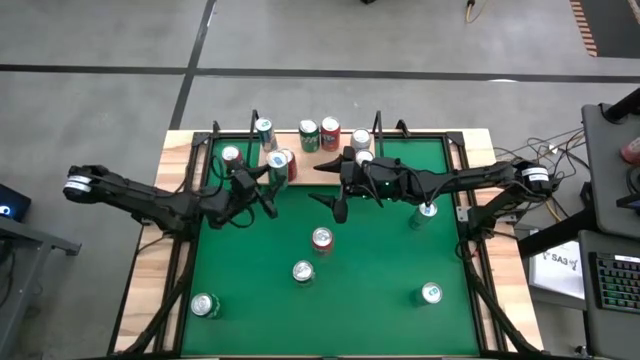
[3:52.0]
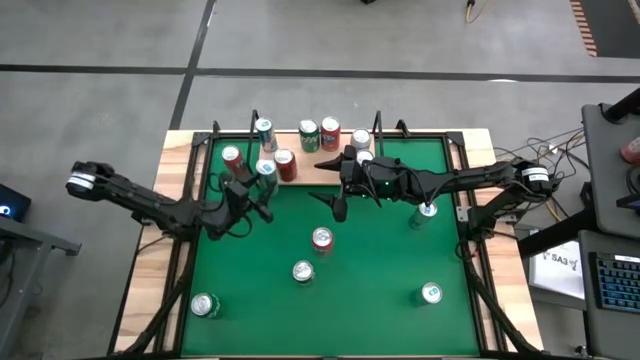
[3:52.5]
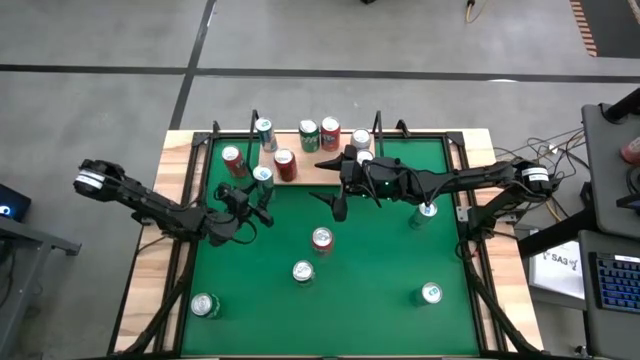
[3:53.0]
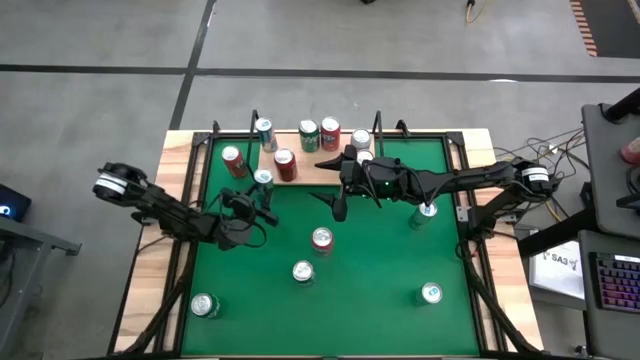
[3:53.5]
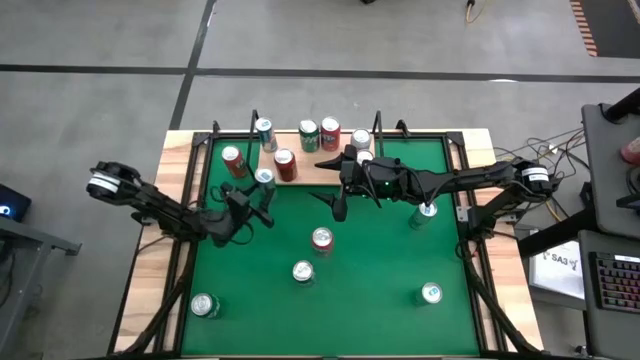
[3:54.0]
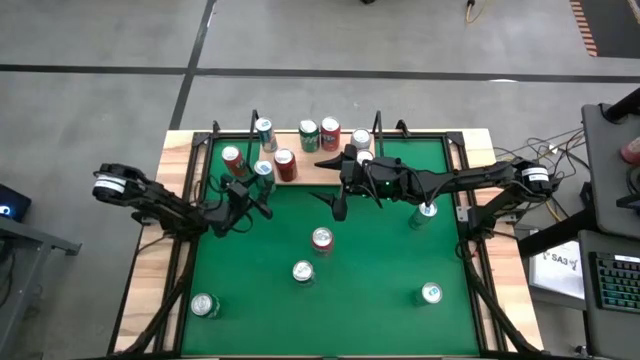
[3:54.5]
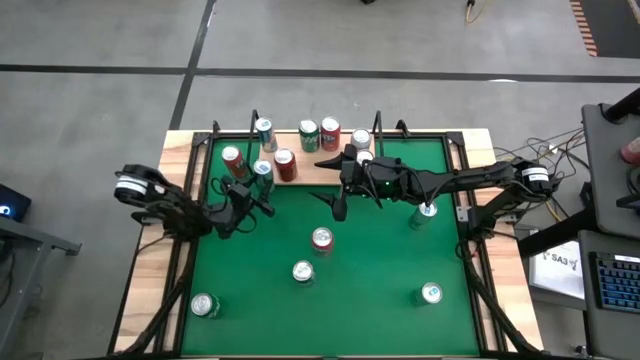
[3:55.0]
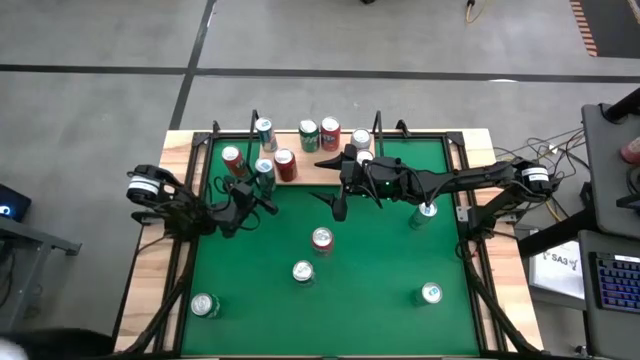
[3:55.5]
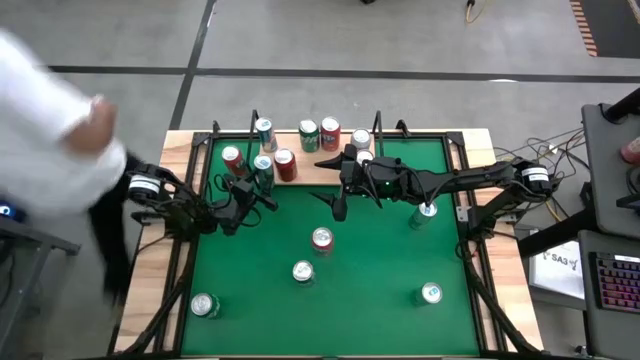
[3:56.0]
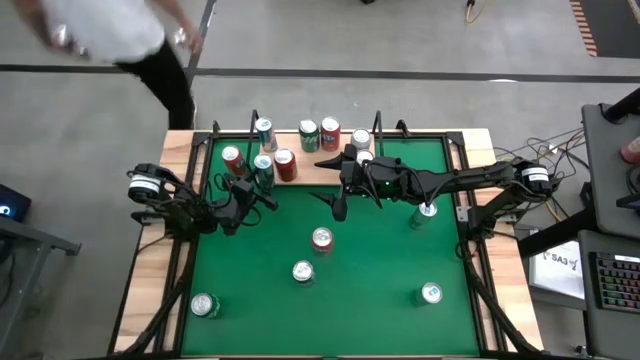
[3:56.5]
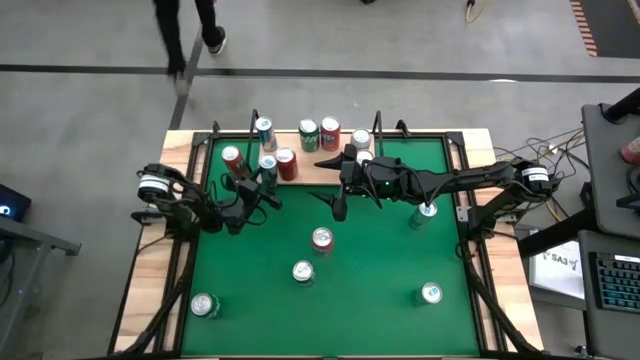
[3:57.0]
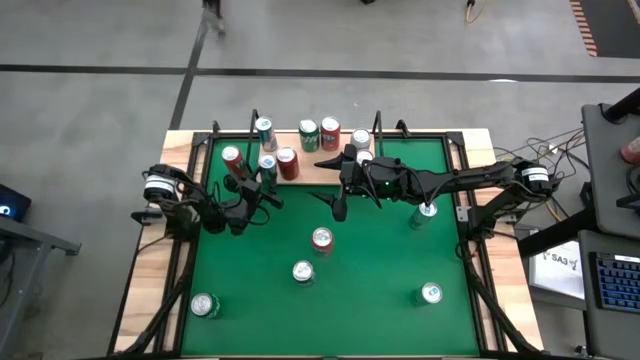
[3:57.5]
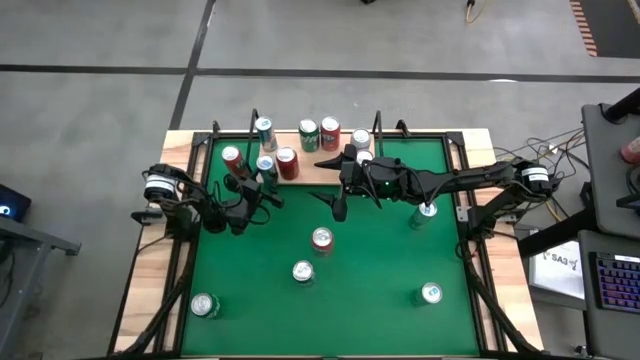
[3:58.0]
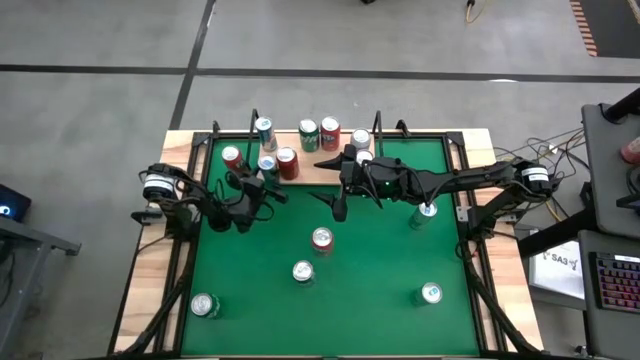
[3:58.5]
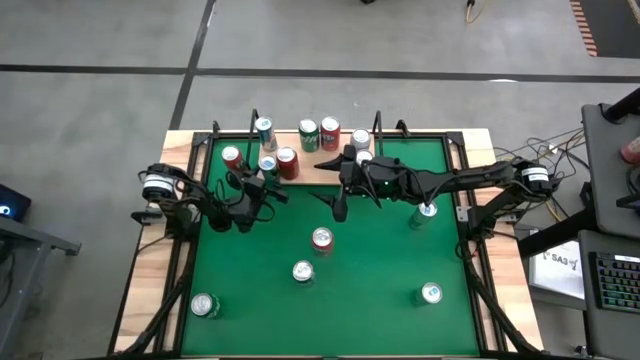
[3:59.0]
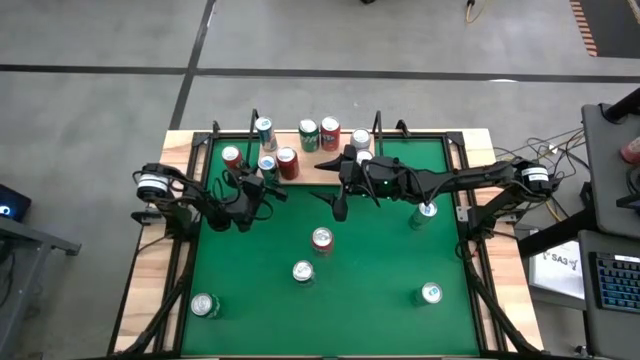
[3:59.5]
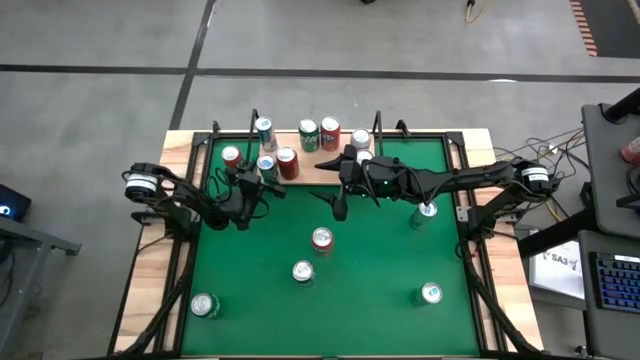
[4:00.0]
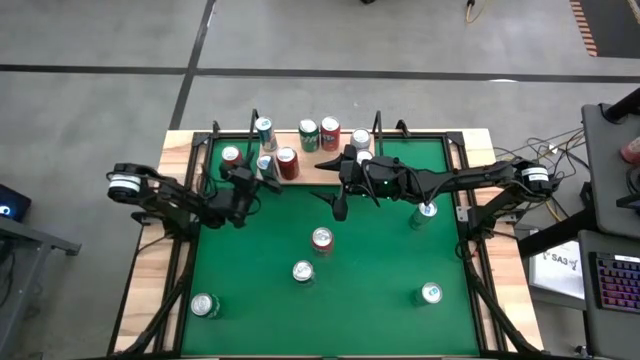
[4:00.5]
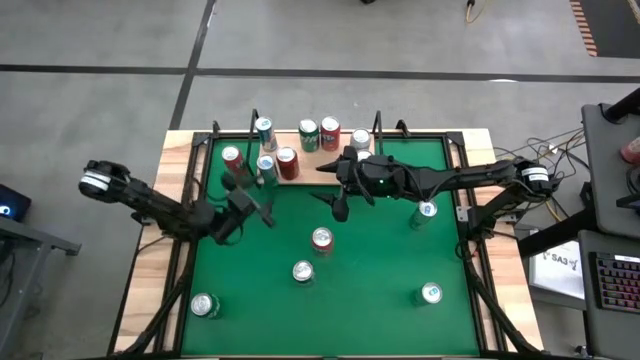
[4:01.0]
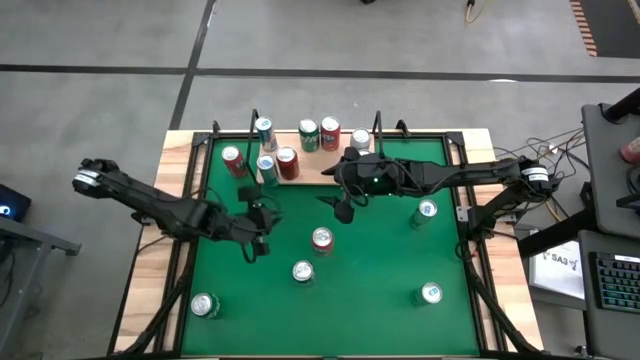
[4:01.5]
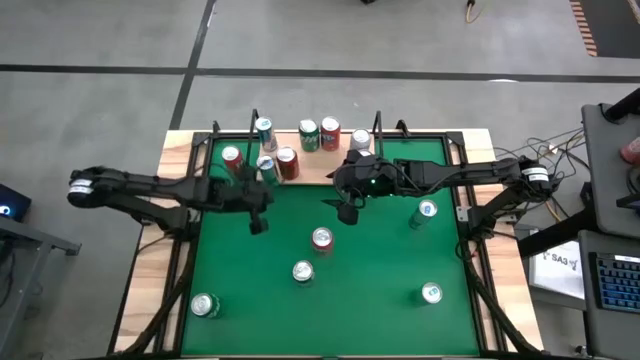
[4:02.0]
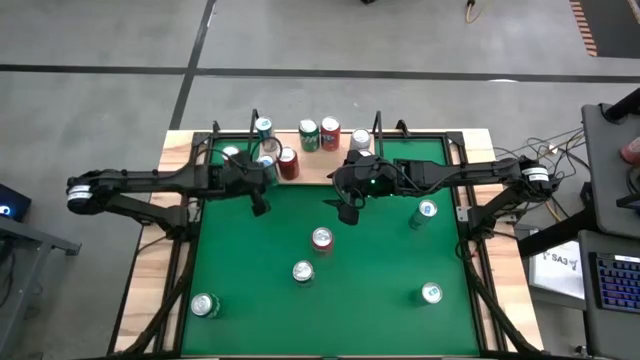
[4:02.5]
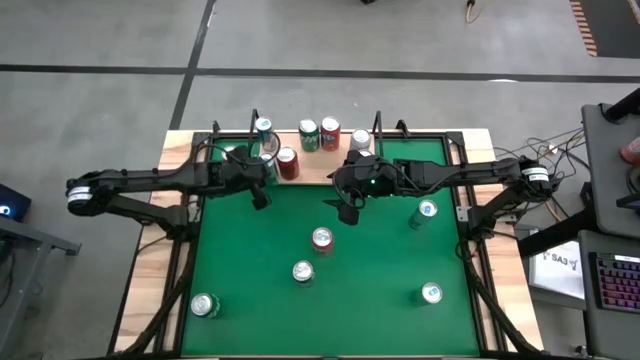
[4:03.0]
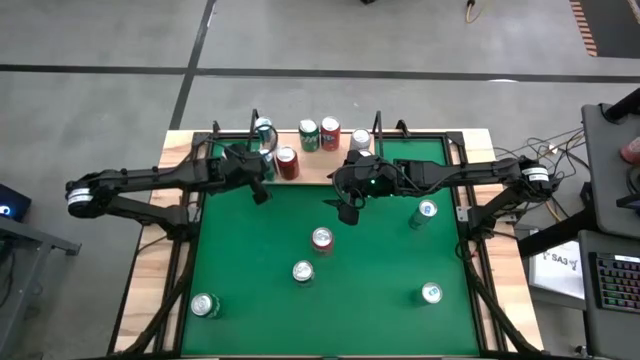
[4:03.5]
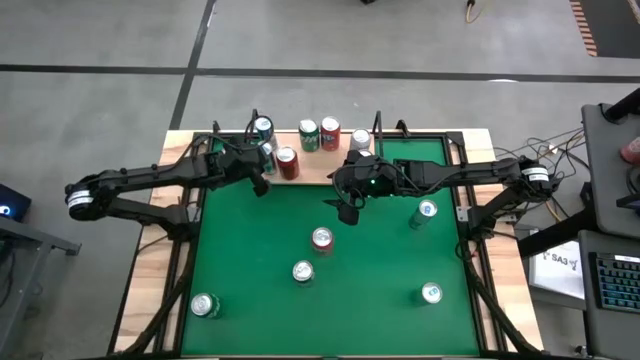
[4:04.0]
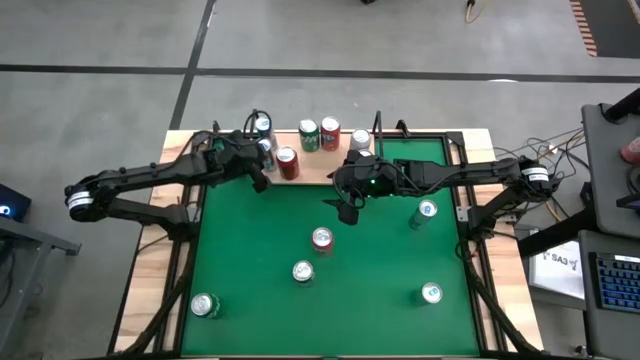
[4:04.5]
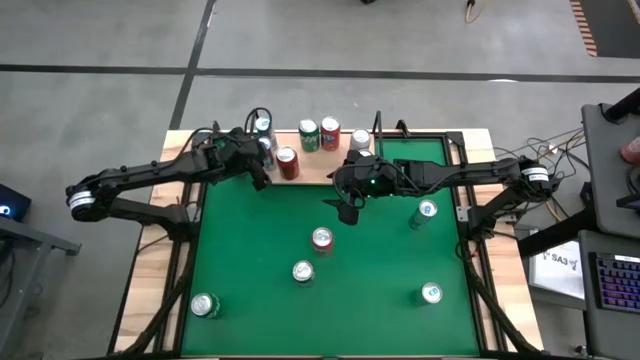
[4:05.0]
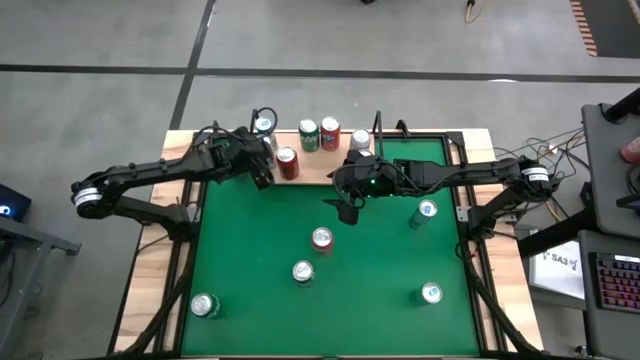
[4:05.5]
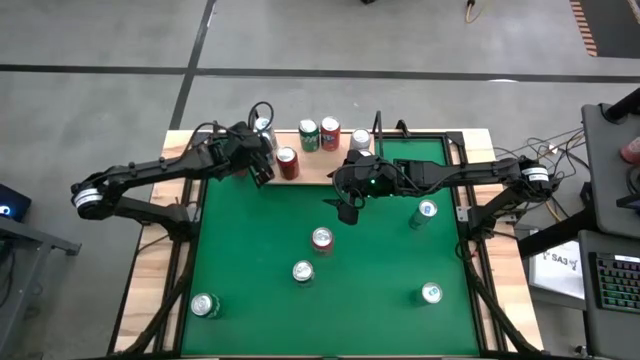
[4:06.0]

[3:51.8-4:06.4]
Task: Pick and place cans onto a shelf
Put the top left blue silver soda can on the shelf aligned with the other blue silver soda can

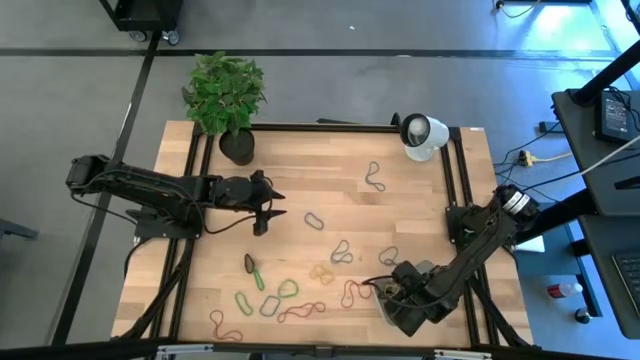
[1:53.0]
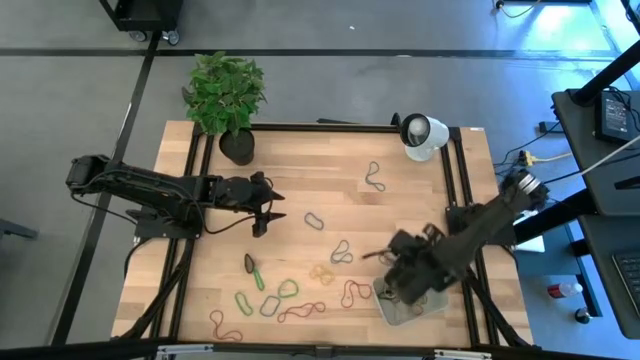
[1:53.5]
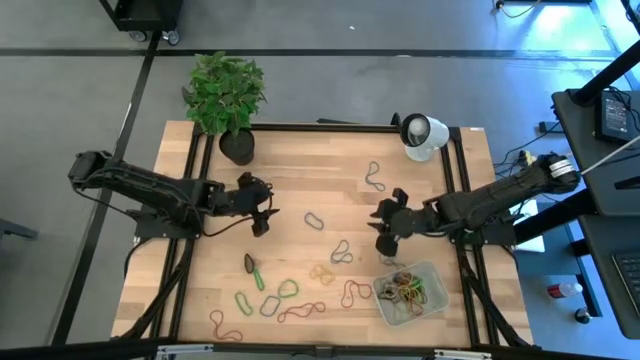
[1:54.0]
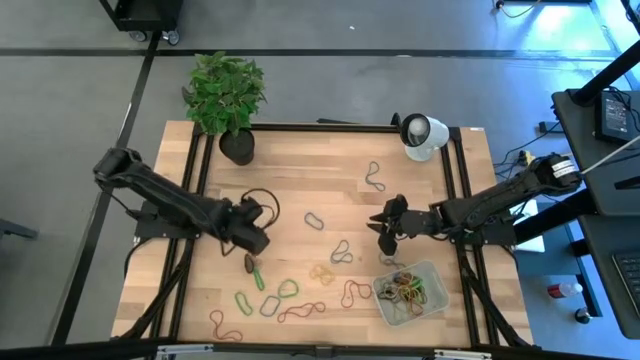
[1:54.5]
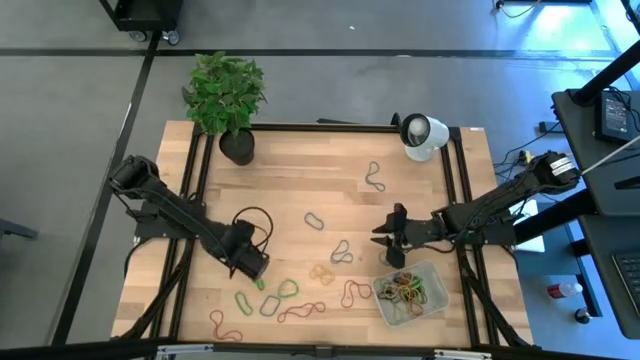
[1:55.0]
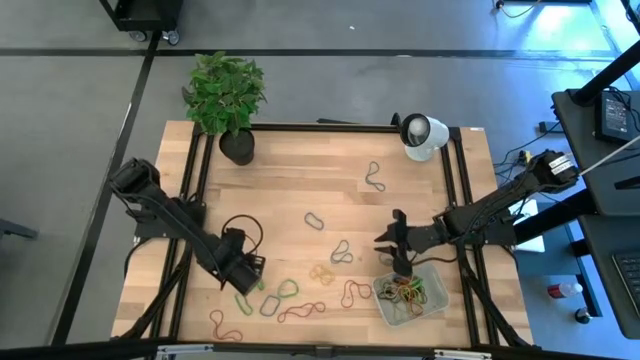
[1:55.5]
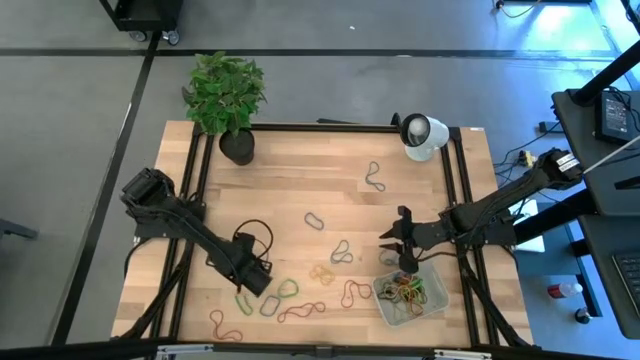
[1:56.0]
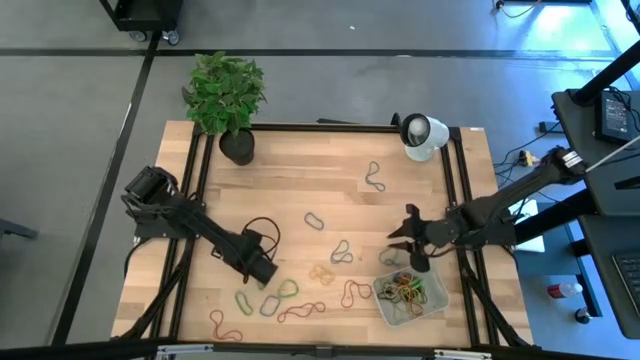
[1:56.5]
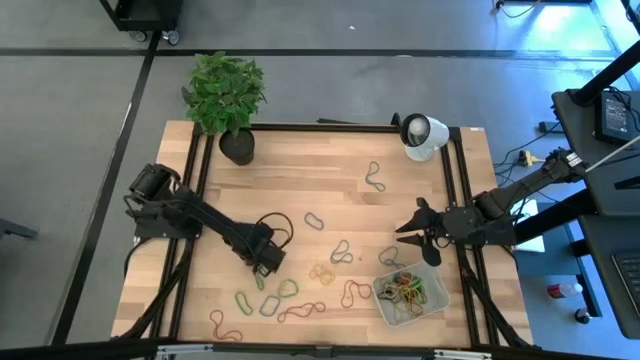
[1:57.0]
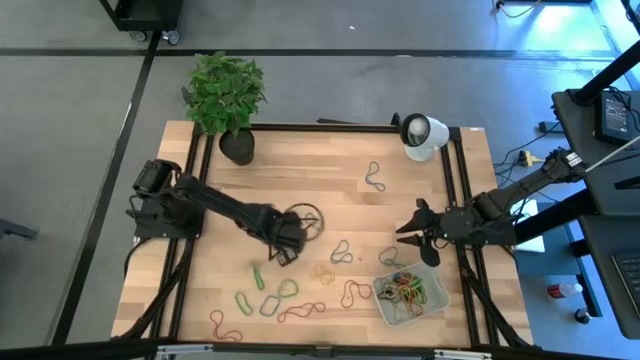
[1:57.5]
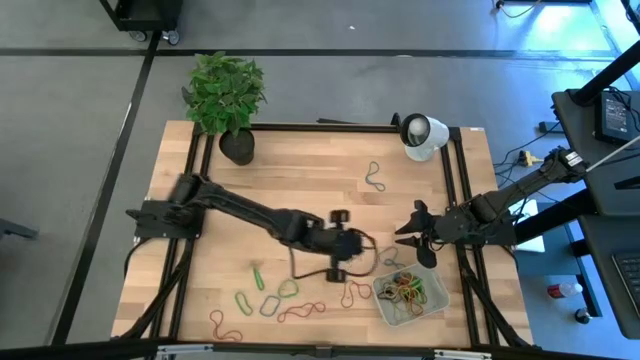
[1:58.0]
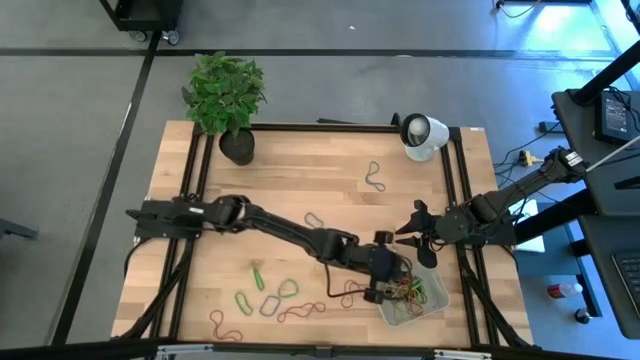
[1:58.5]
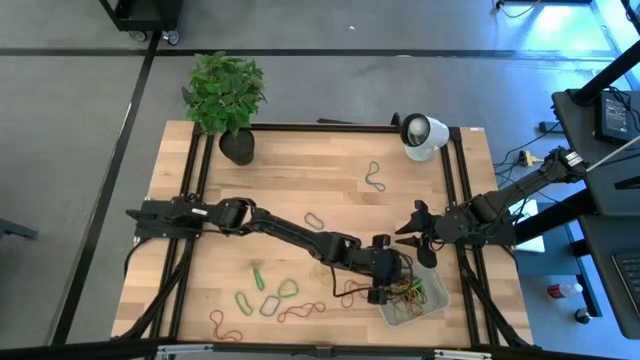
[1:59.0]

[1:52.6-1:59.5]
Task: Pick and place rubber bands into bin
Put the black rubber band into the white bin
